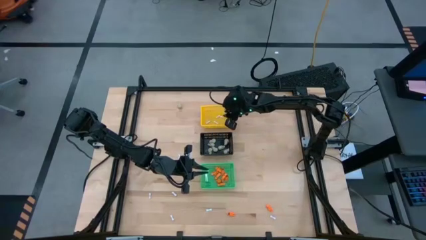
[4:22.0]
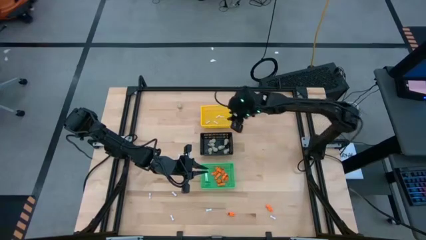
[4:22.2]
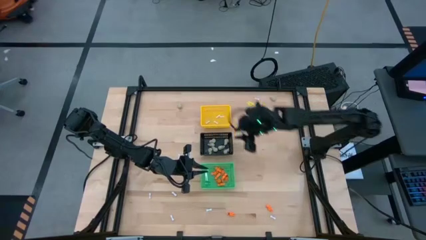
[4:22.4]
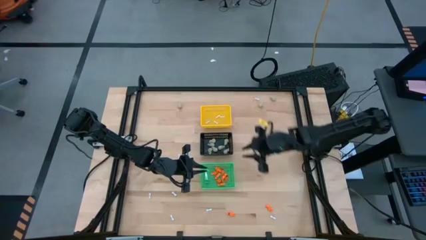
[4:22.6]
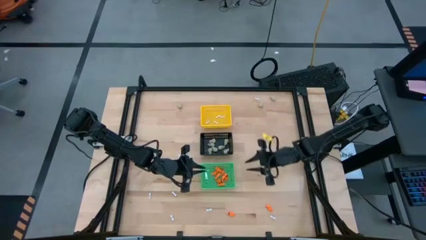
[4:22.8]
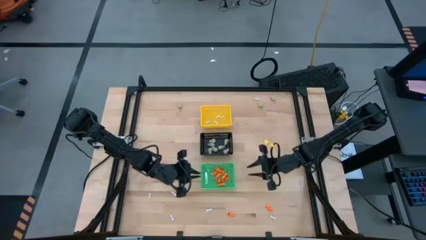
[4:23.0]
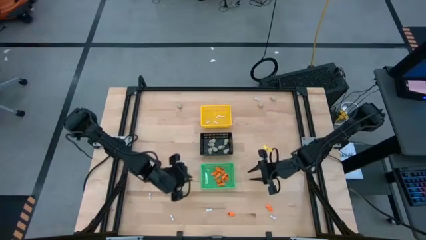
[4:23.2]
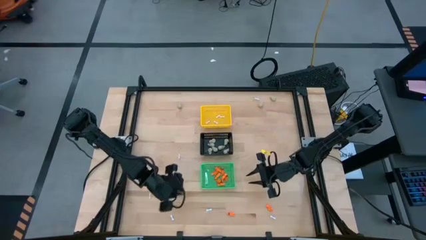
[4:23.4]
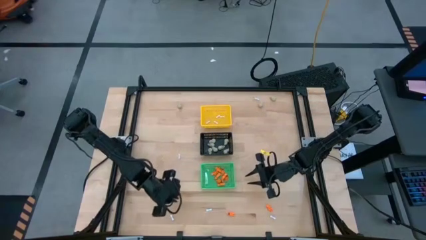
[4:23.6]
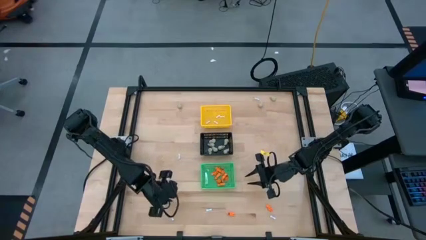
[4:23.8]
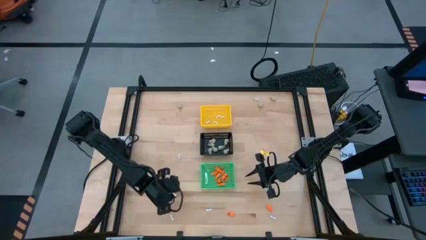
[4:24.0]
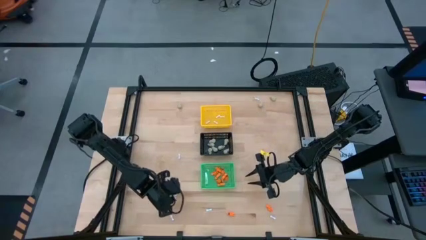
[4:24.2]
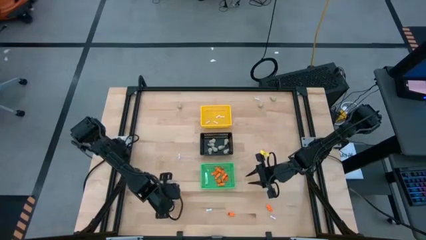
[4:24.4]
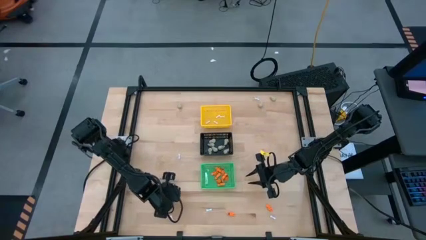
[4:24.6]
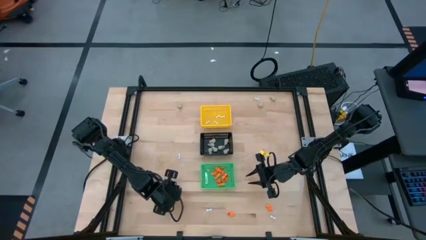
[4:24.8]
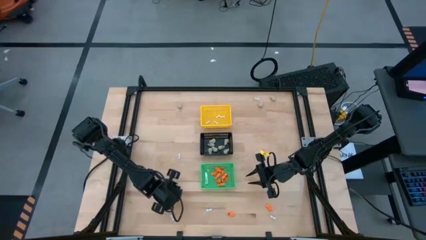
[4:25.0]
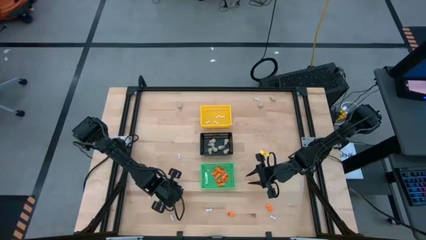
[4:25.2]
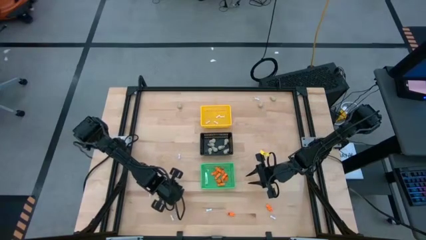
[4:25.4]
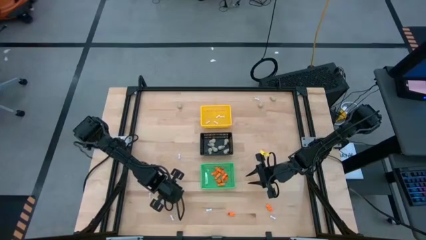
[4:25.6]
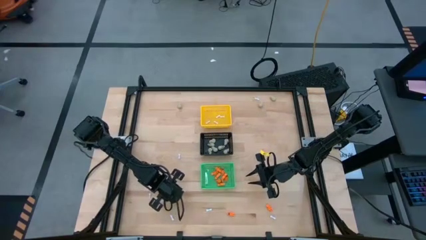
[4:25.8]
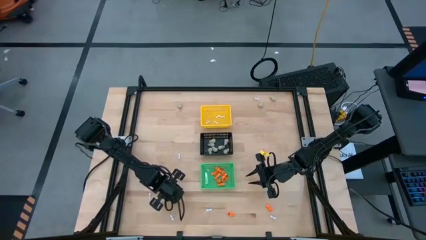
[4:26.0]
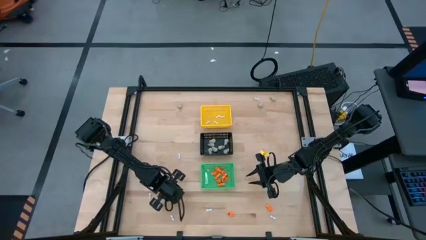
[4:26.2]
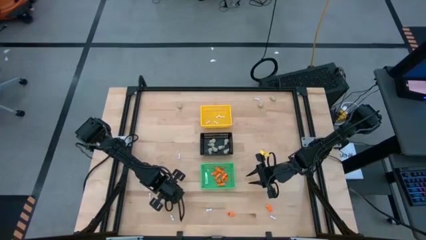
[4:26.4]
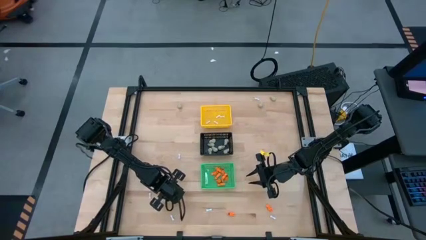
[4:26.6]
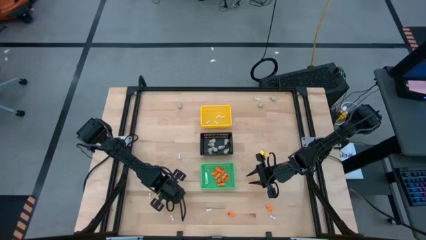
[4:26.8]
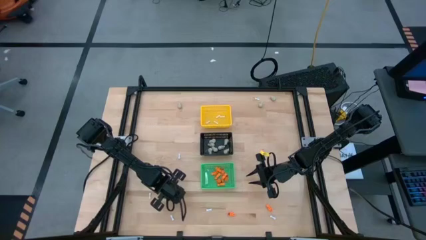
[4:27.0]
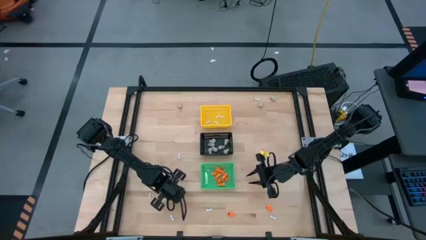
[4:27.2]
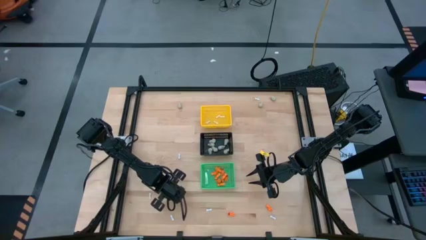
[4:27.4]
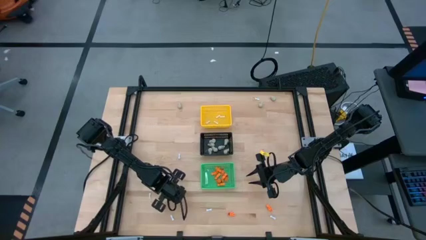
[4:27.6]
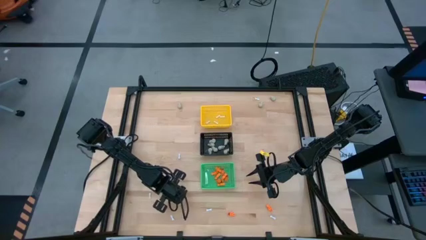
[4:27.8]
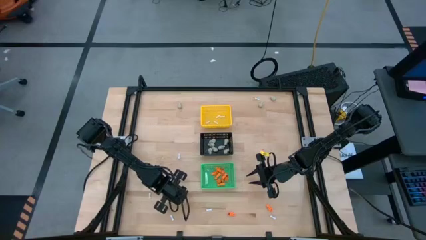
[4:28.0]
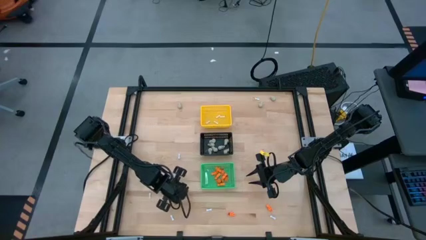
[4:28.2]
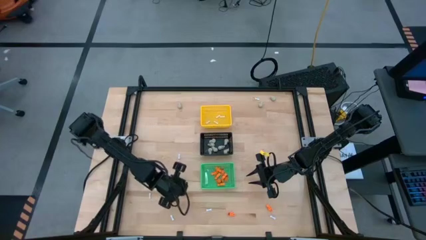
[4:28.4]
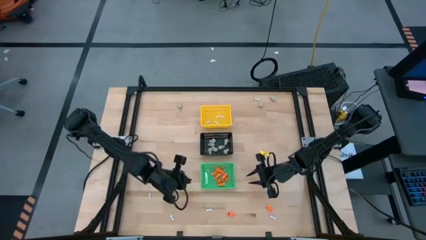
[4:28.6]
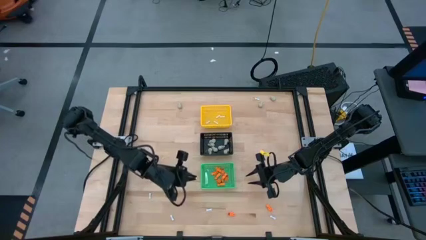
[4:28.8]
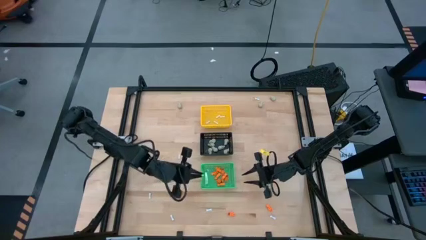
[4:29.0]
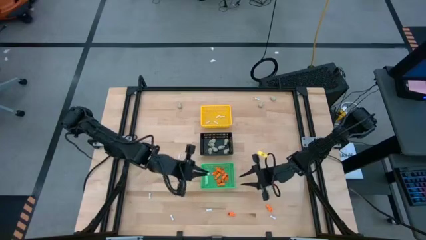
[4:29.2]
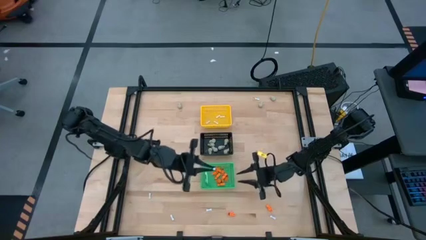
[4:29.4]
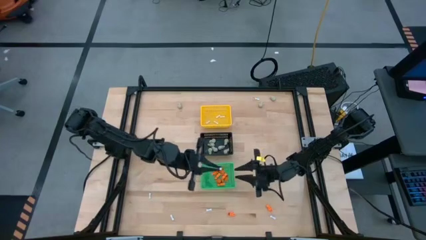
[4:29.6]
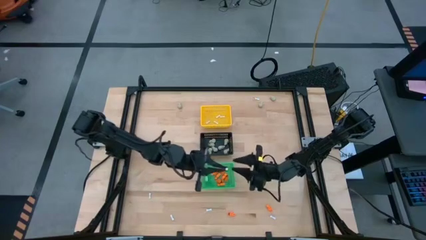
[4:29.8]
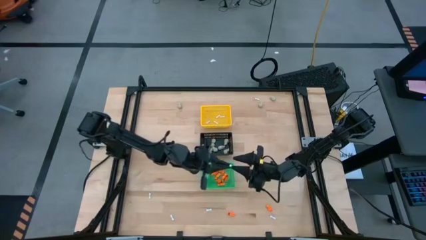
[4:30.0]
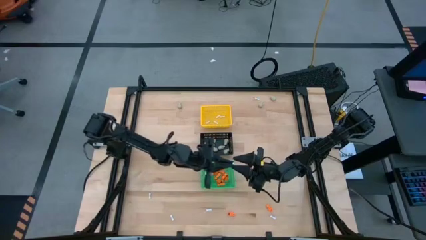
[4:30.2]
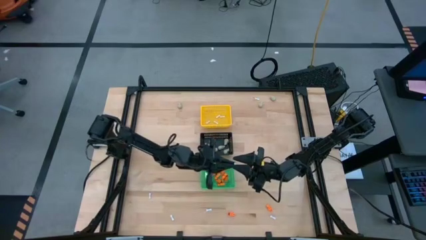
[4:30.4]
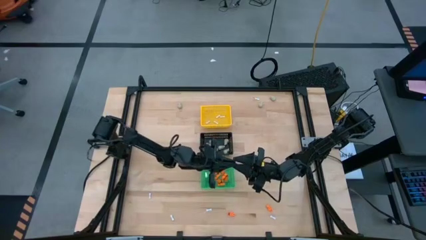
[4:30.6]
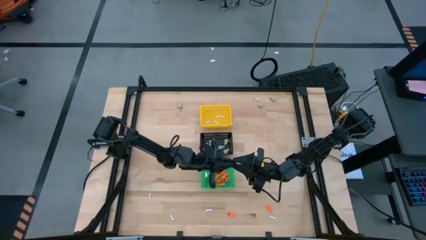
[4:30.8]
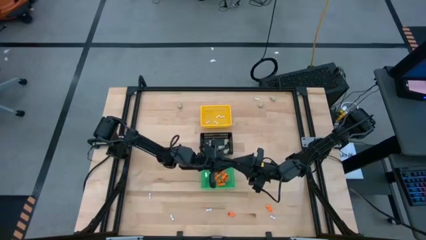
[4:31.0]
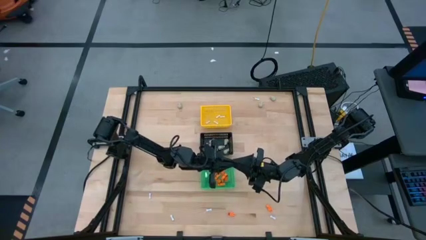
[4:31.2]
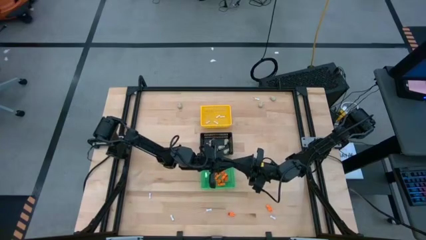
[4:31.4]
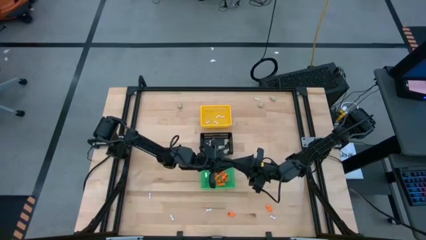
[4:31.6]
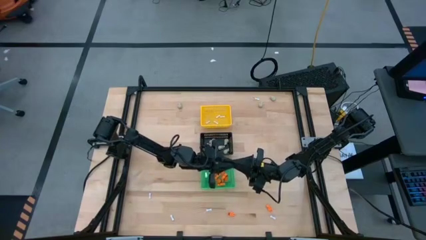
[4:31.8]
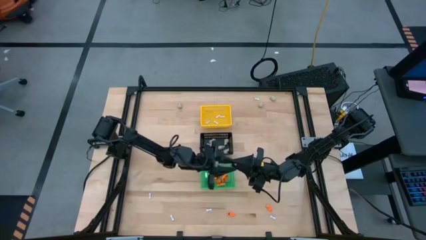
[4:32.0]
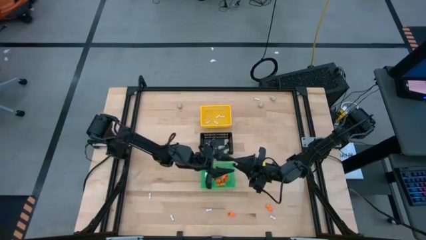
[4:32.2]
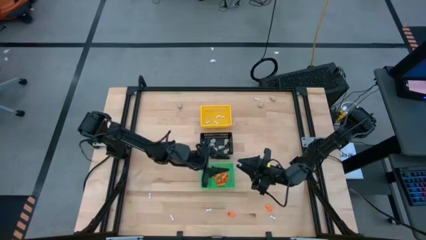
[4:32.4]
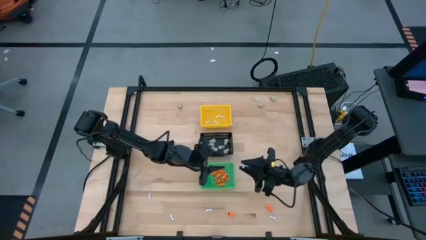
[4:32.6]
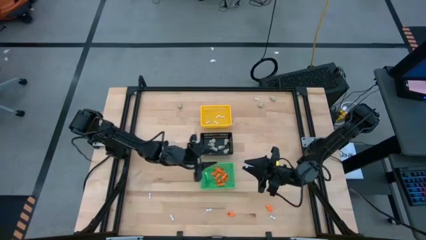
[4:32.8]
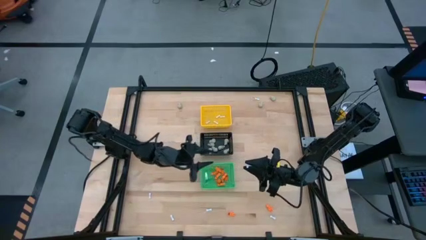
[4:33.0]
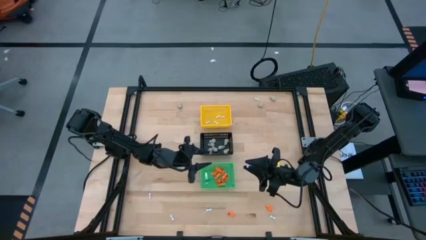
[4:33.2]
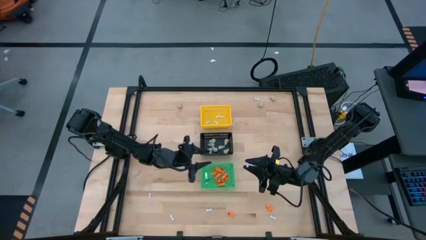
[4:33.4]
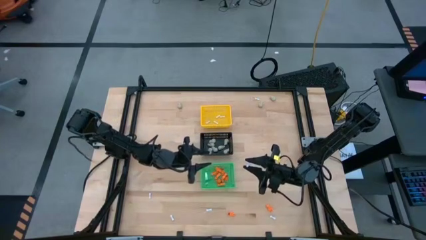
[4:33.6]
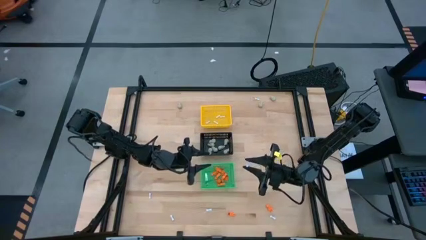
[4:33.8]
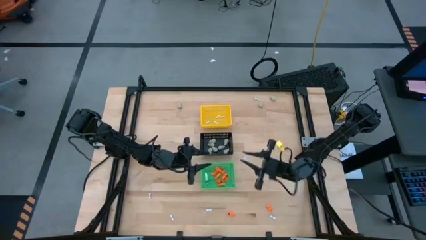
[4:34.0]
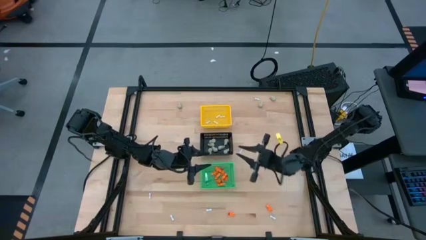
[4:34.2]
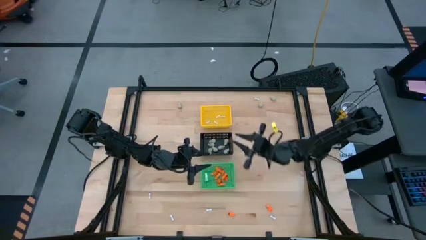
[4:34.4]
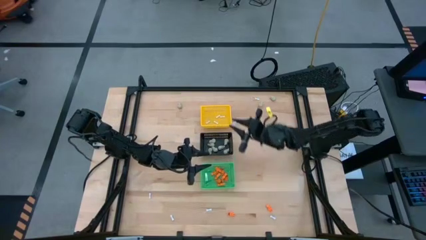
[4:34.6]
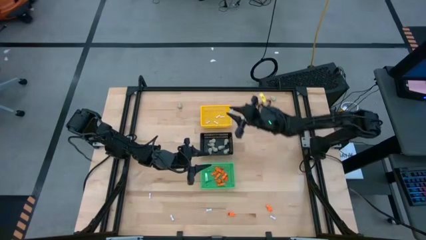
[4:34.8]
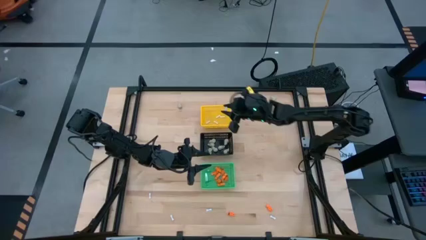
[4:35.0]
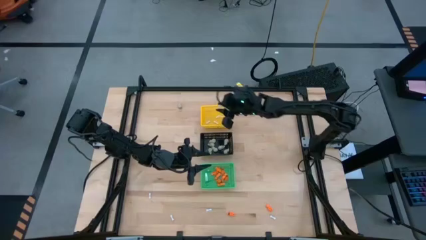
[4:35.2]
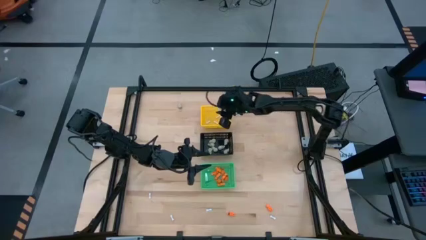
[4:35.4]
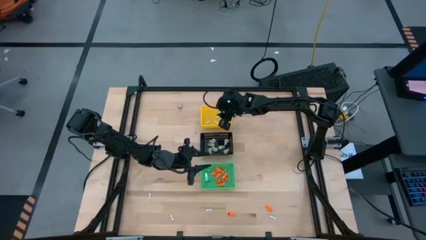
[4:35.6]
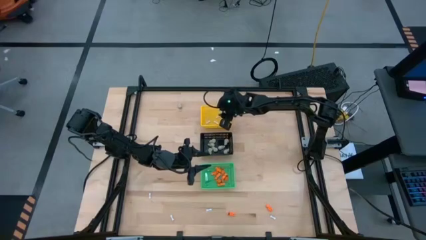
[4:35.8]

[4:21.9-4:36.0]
Task: Sort Halloween decoration
Put the white bone toy into the yellow basket
